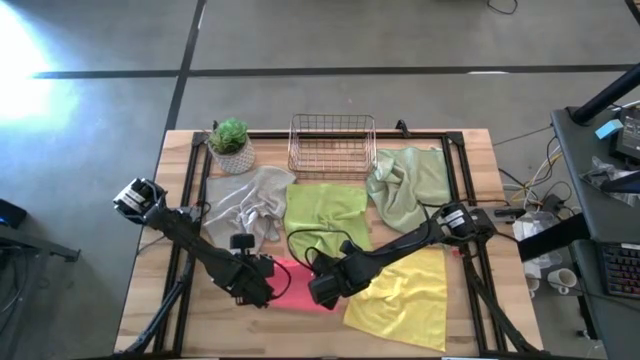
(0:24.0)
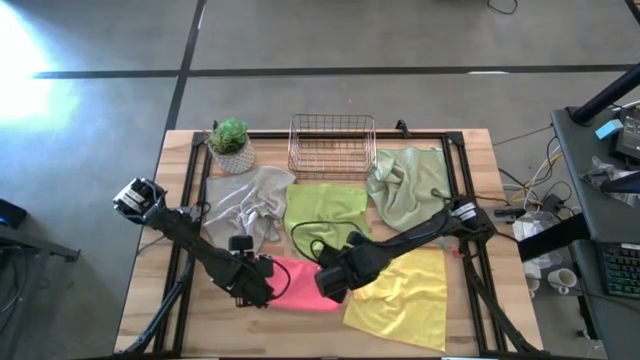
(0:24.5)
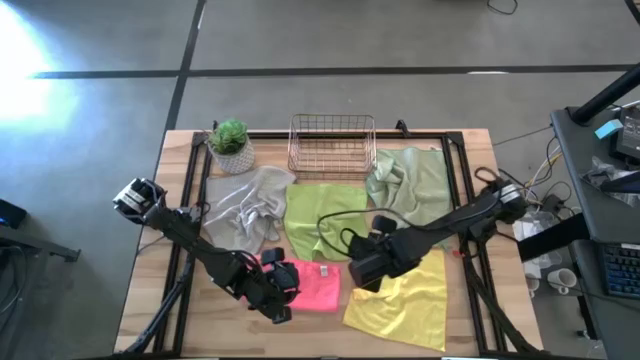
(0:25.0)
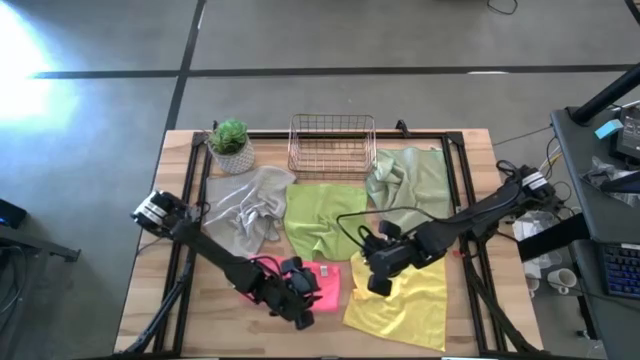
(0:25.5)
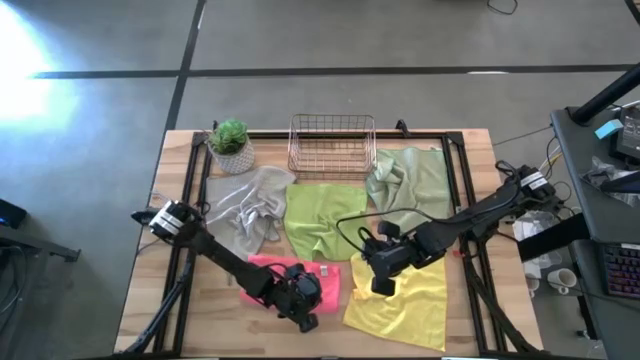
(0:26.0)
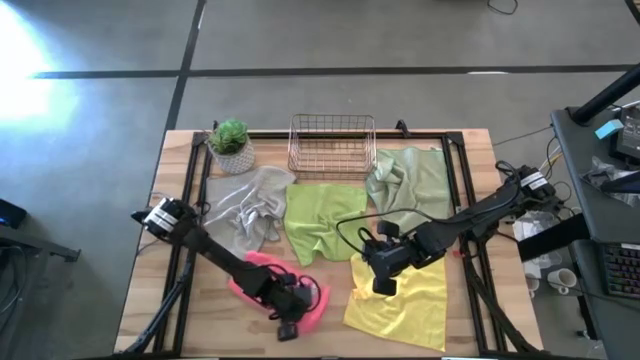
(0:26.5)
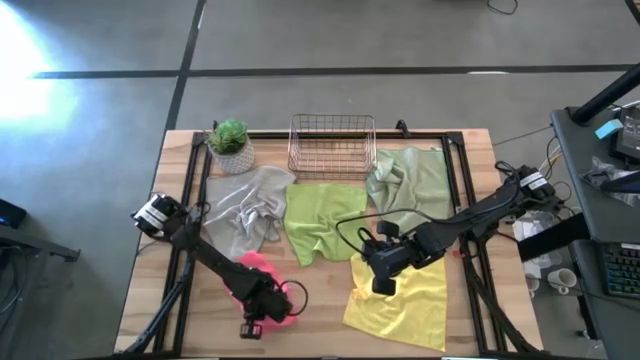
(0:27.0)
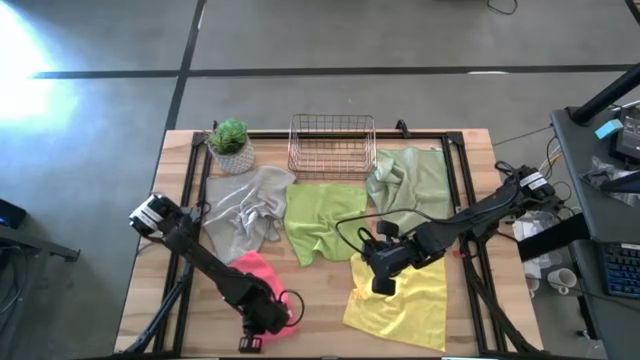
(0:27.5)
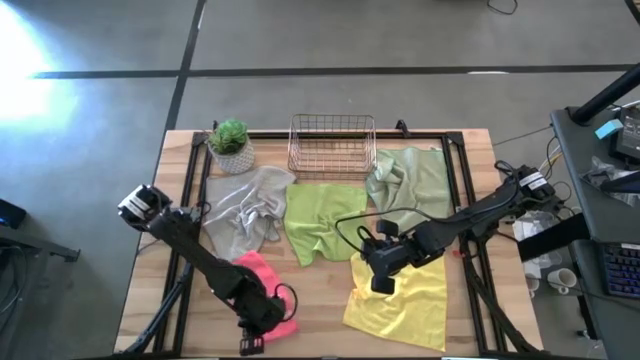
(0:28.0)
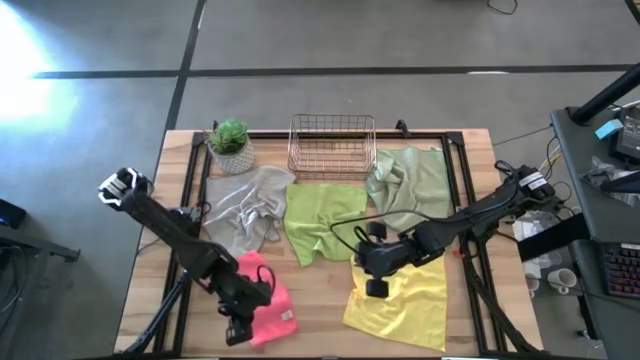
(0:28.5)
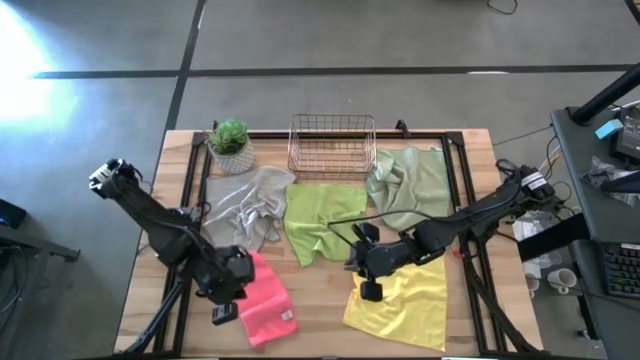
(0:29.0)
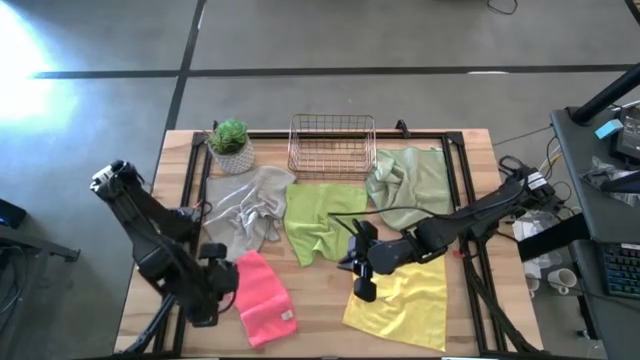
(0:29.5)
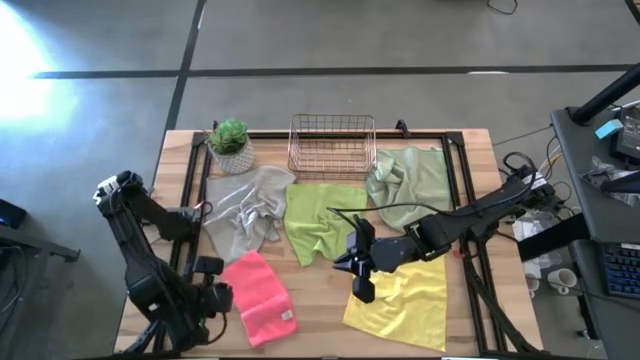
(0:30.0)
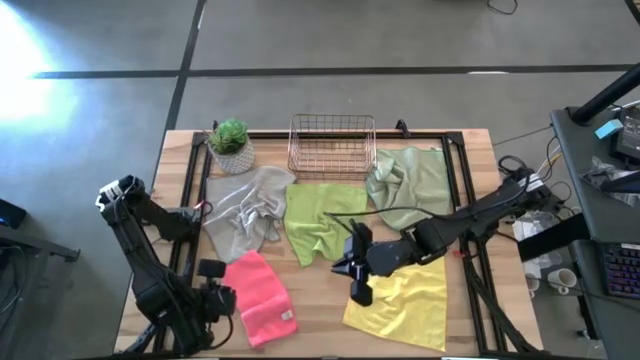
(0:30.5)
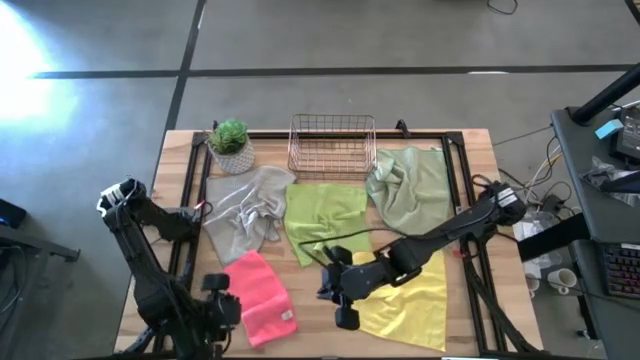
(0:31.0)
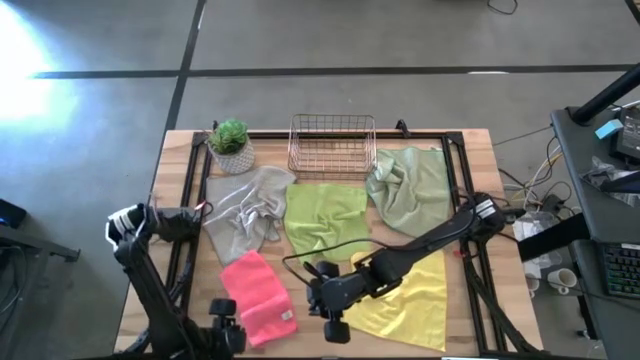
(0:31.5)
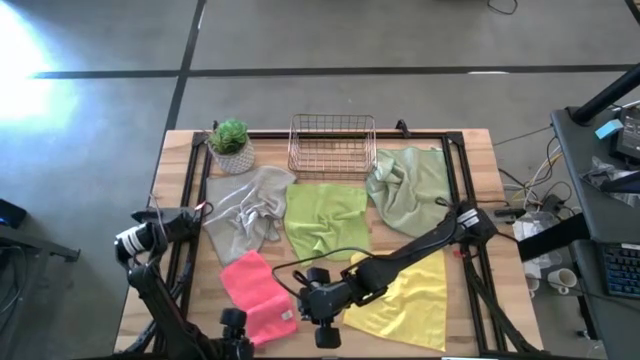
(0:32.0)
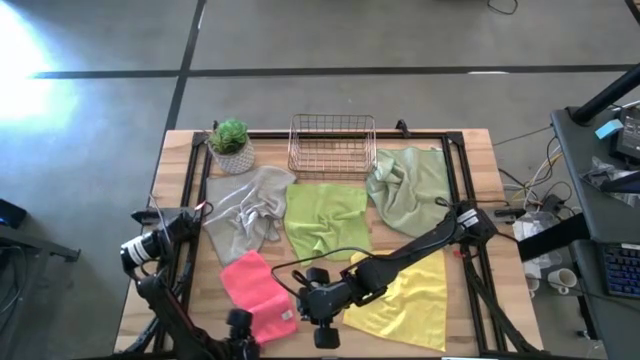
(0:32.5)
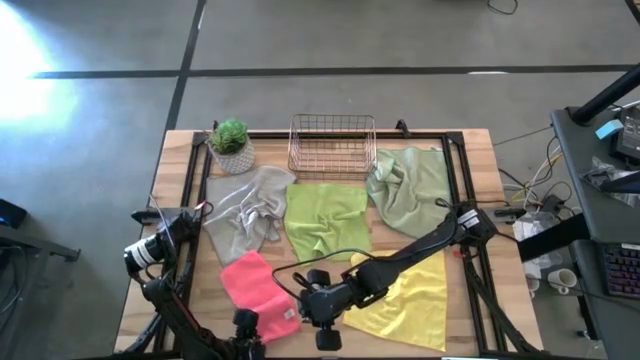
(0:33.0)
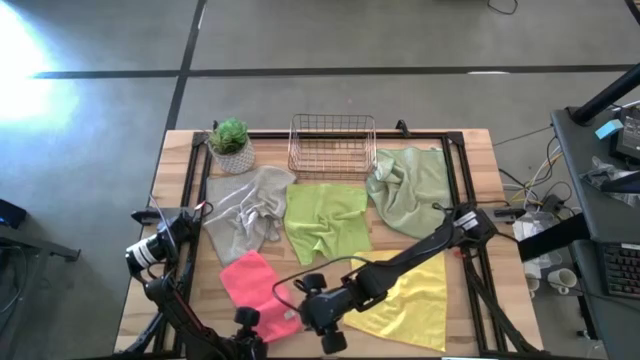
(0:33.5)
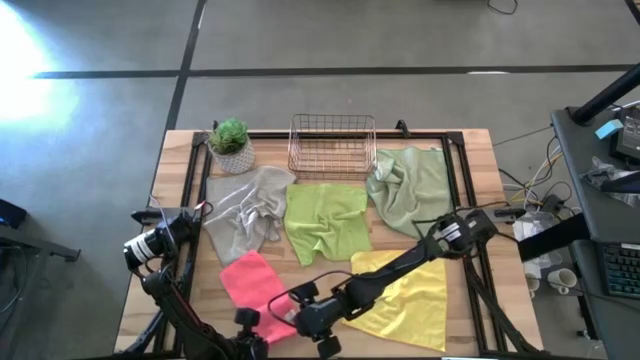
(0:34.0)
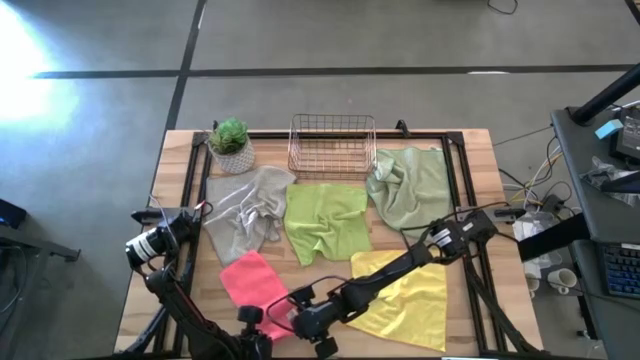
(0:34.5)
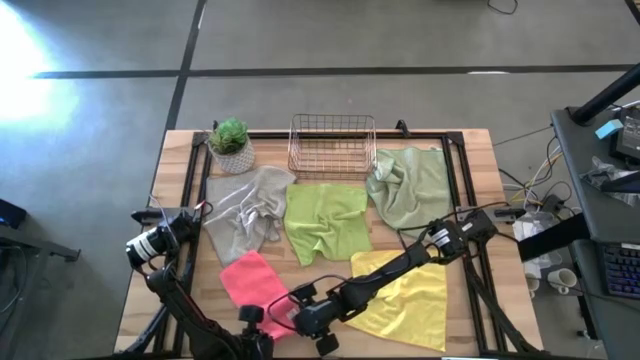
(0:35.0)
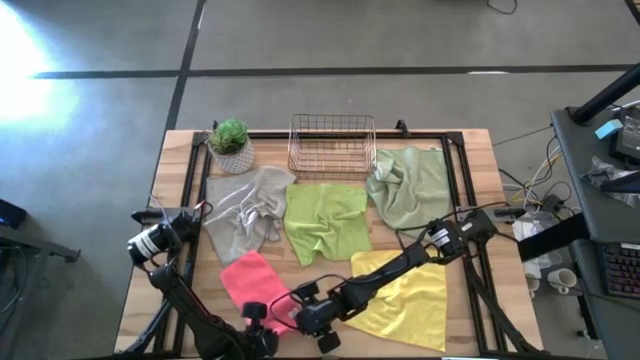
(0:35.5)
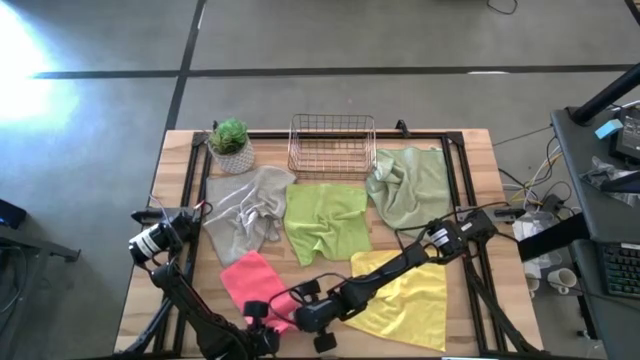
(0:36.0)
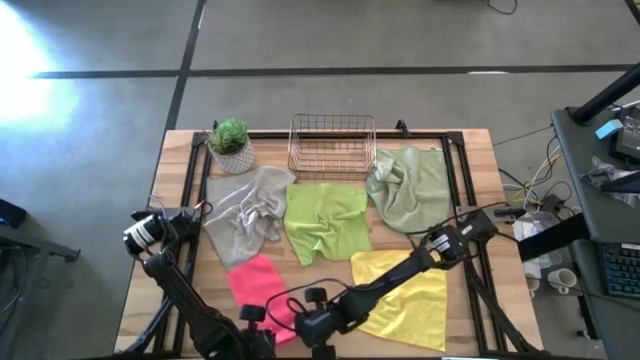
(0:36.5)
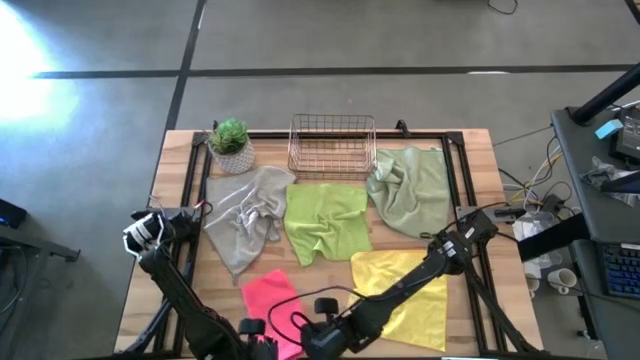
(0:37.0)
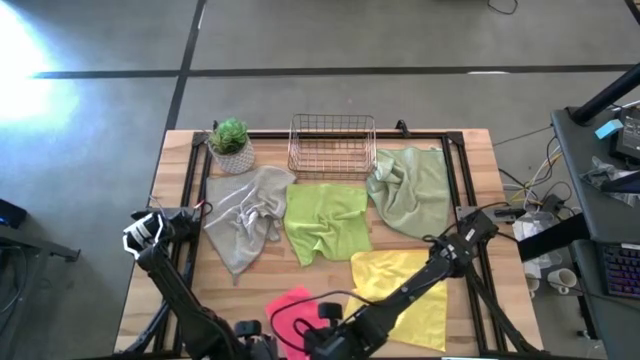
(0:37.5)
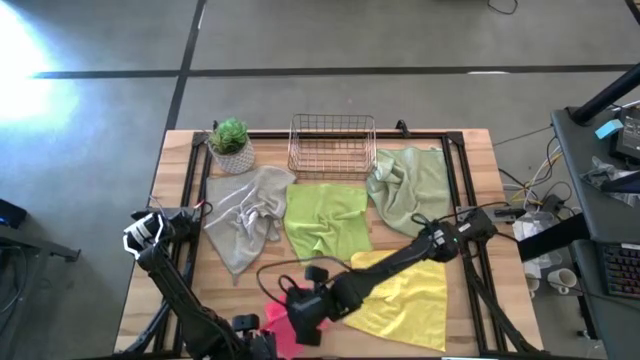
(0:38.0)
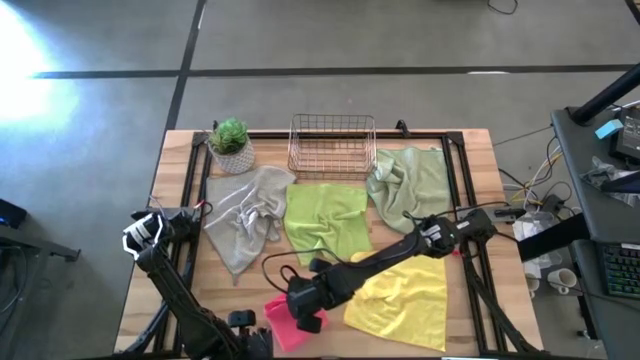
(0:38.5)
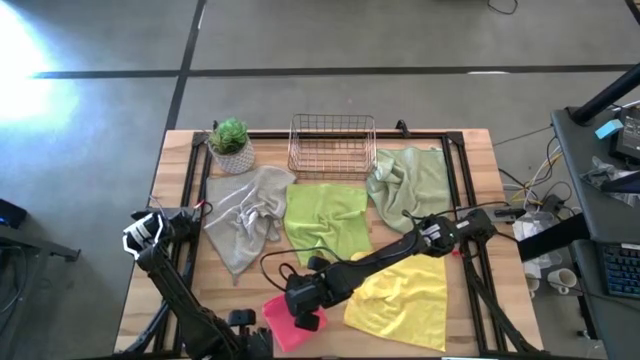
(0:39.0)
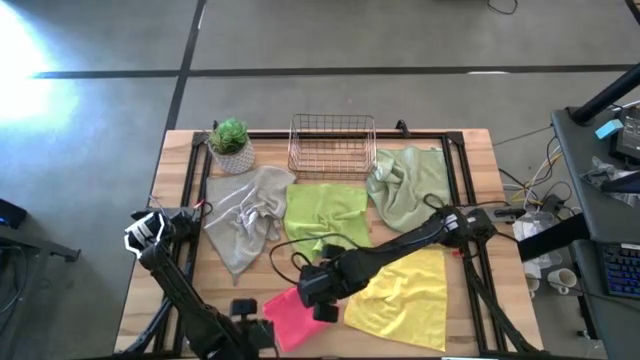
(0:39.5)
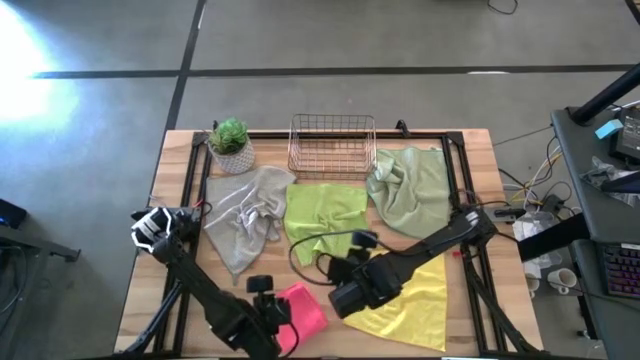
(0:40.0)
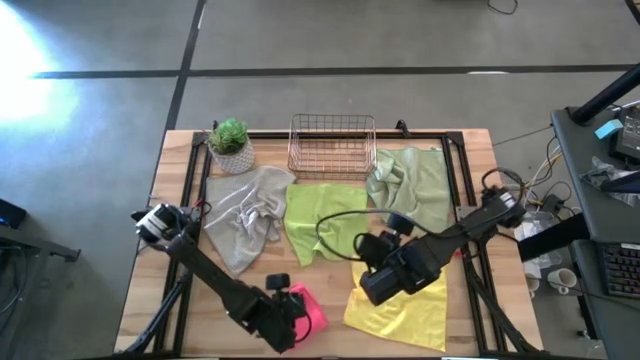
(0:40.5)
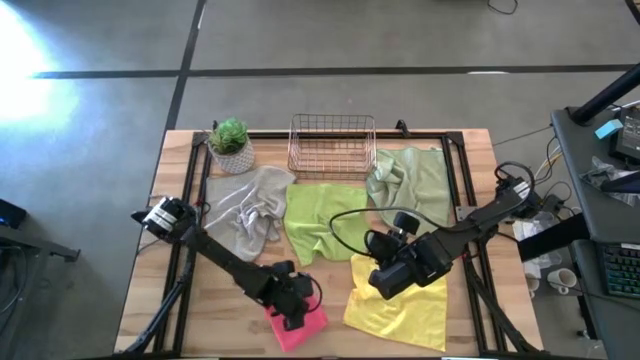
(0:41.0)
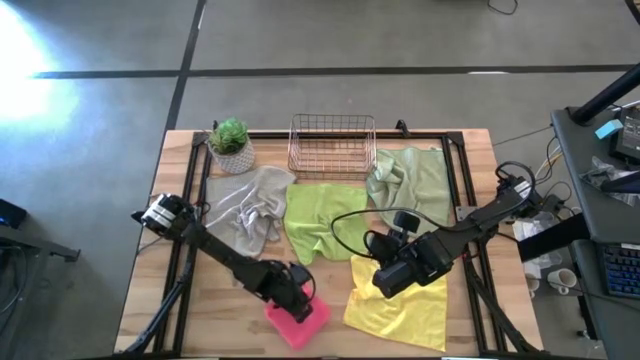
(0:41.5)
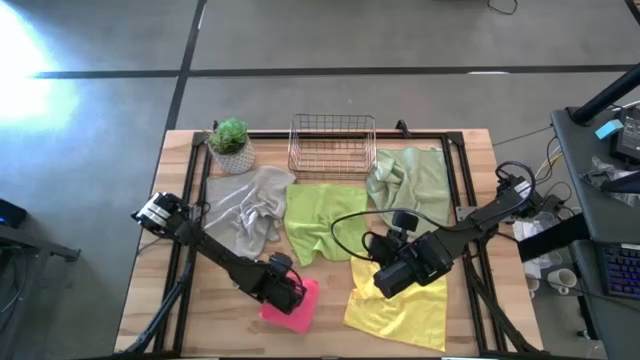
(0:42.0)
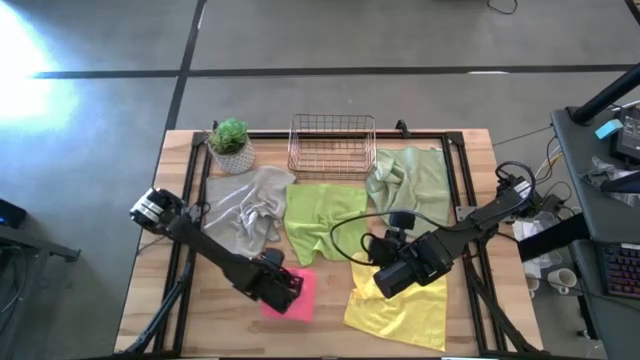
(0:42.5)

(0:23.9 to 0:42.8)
Task: Fold microfiber towels
Fold the pink towel
